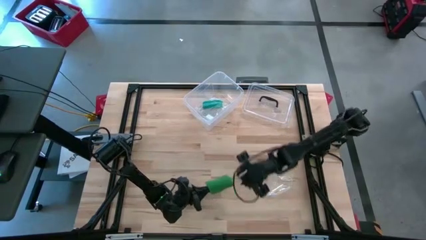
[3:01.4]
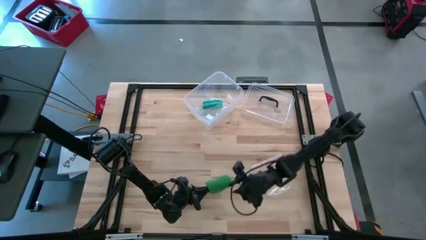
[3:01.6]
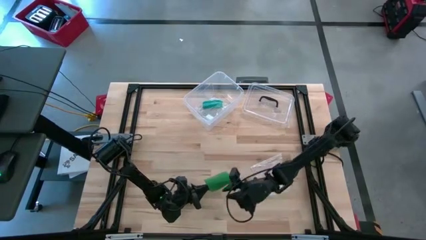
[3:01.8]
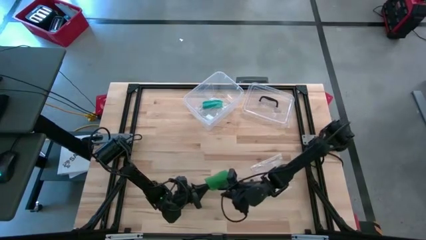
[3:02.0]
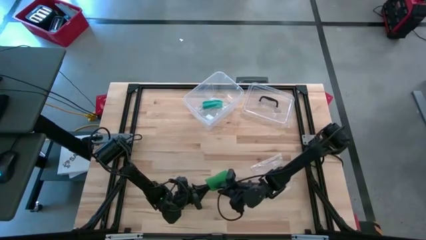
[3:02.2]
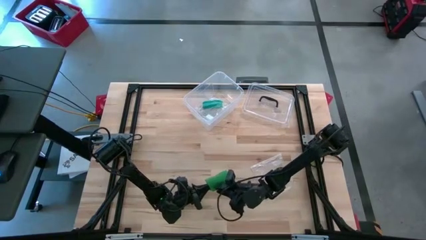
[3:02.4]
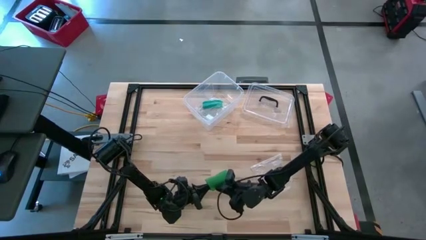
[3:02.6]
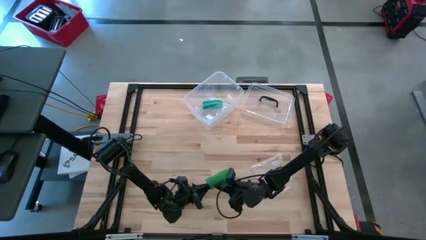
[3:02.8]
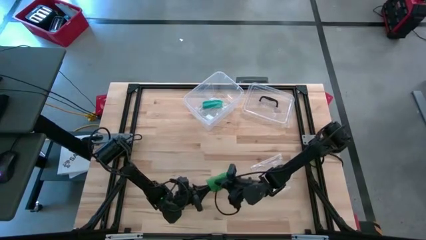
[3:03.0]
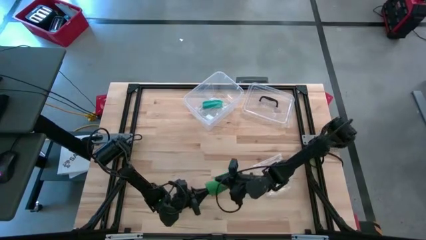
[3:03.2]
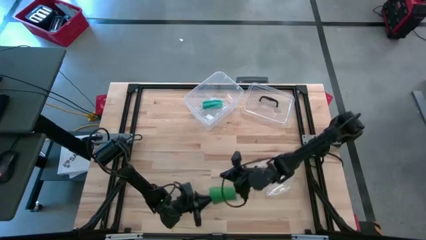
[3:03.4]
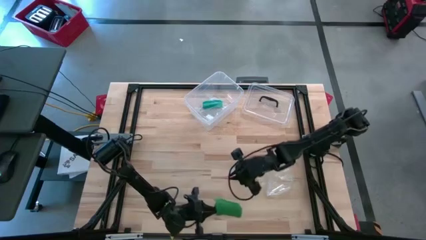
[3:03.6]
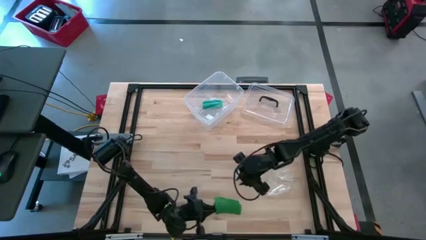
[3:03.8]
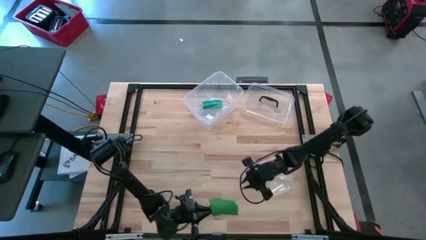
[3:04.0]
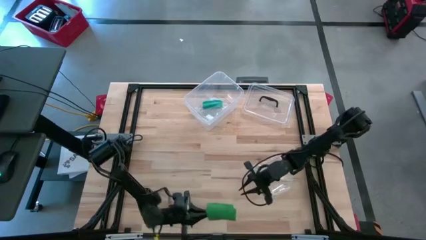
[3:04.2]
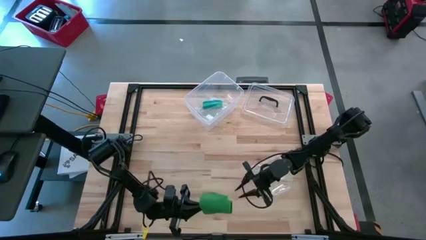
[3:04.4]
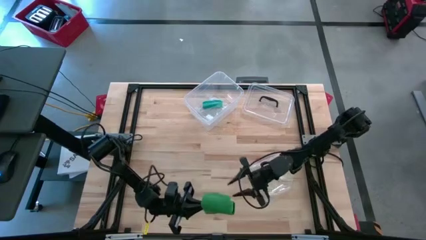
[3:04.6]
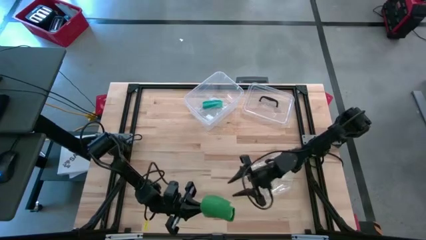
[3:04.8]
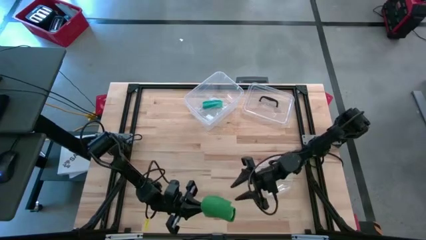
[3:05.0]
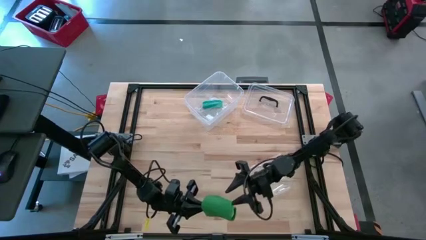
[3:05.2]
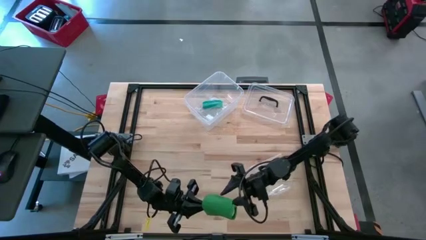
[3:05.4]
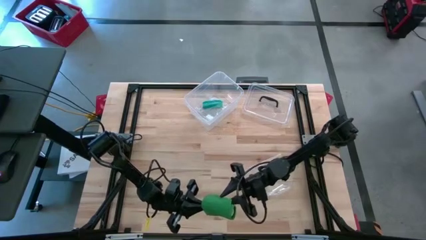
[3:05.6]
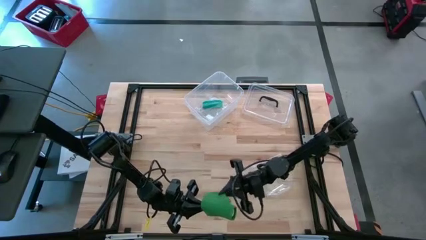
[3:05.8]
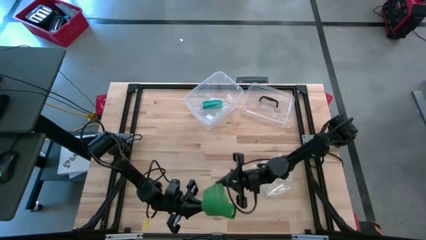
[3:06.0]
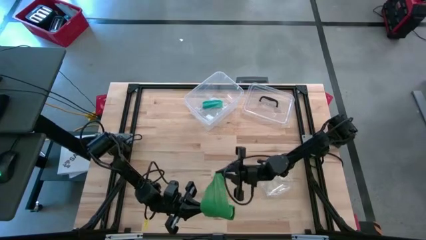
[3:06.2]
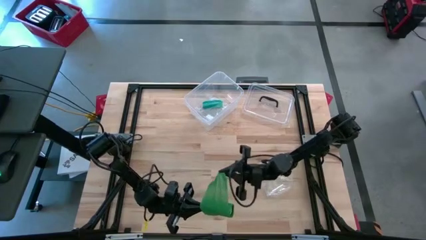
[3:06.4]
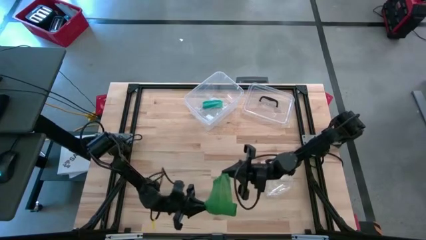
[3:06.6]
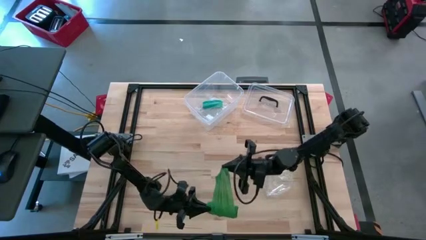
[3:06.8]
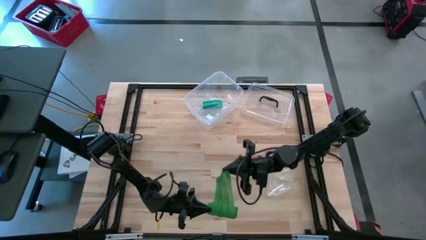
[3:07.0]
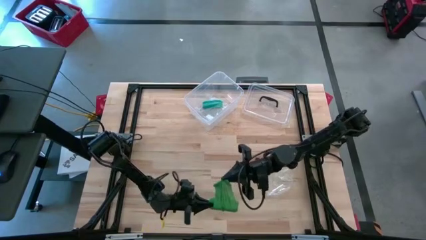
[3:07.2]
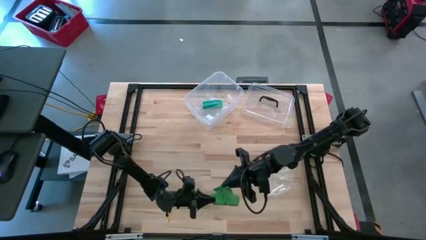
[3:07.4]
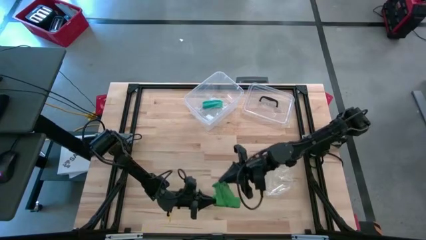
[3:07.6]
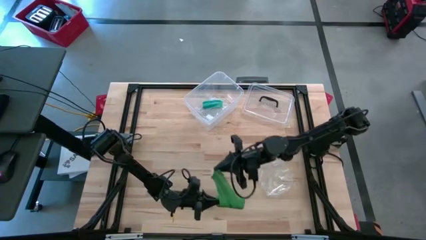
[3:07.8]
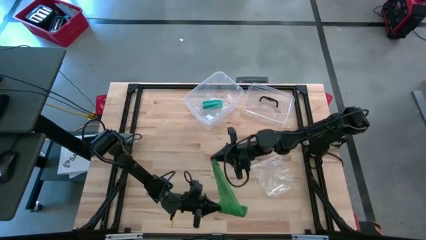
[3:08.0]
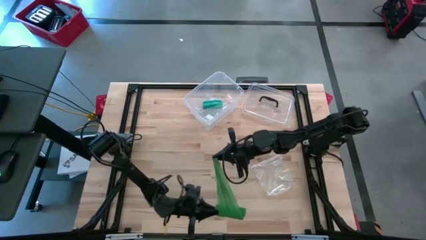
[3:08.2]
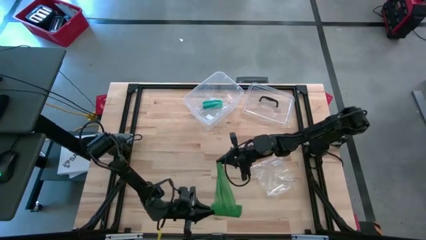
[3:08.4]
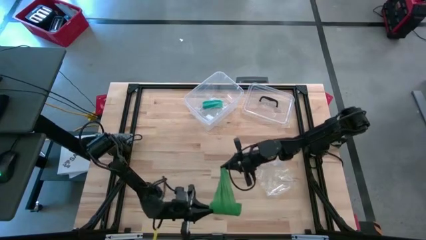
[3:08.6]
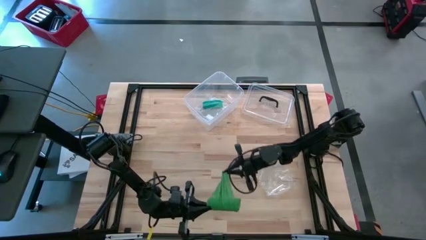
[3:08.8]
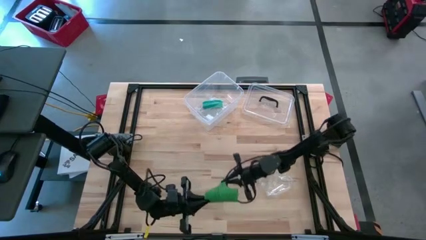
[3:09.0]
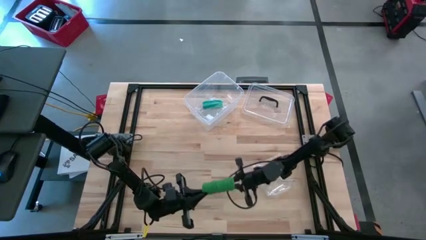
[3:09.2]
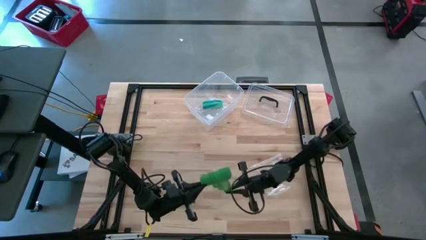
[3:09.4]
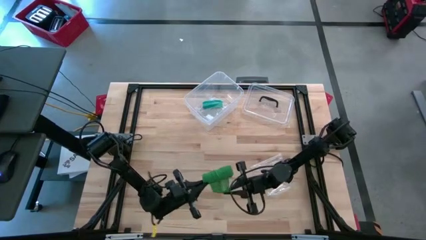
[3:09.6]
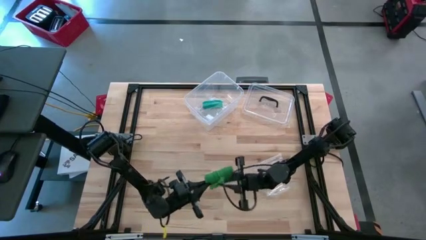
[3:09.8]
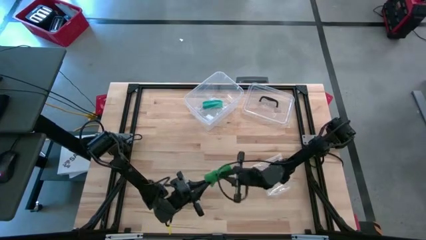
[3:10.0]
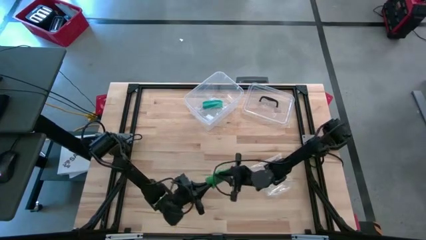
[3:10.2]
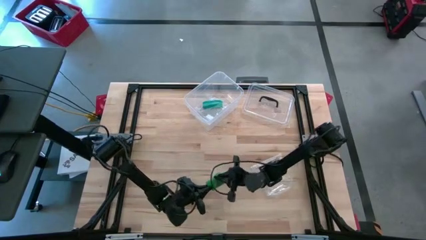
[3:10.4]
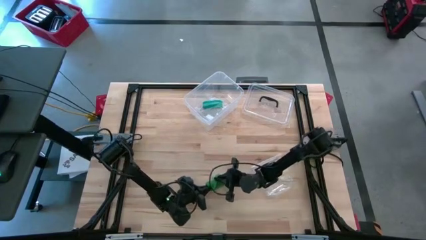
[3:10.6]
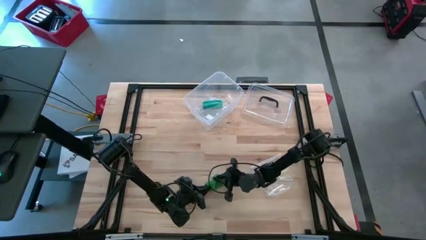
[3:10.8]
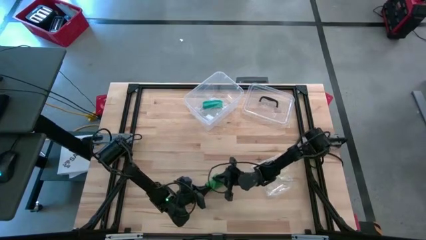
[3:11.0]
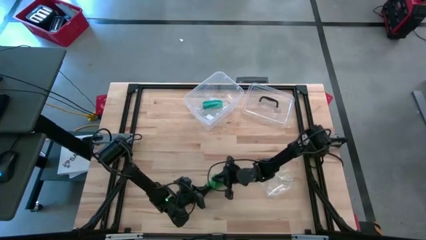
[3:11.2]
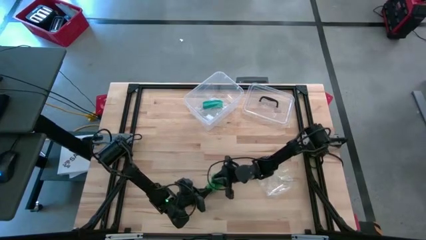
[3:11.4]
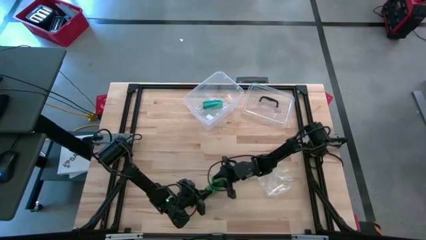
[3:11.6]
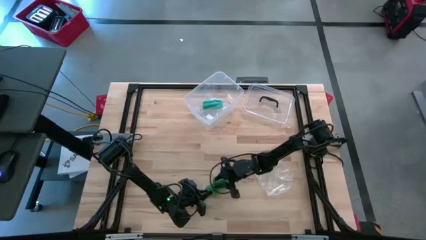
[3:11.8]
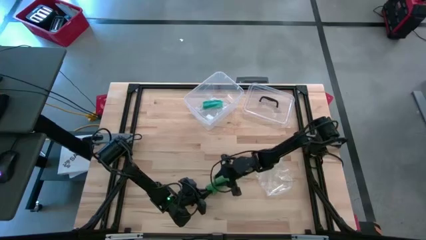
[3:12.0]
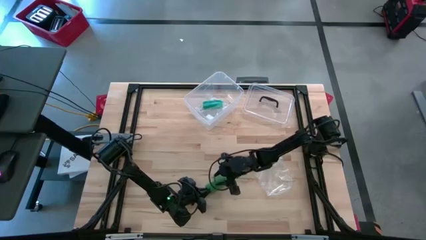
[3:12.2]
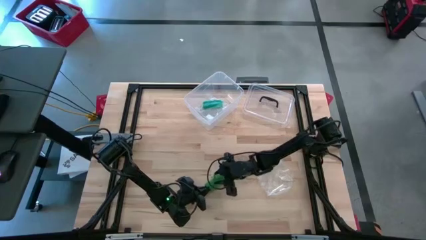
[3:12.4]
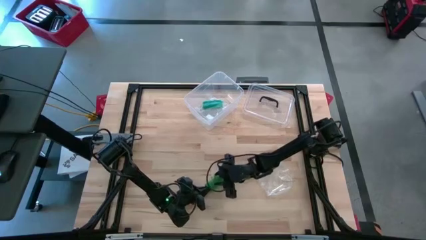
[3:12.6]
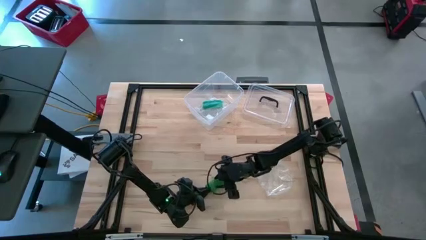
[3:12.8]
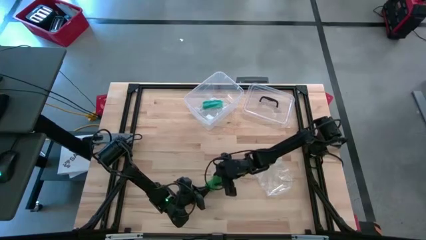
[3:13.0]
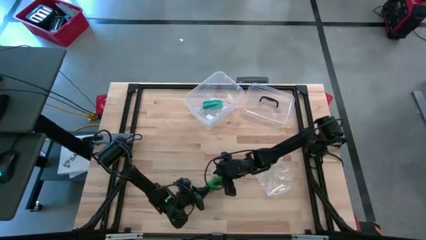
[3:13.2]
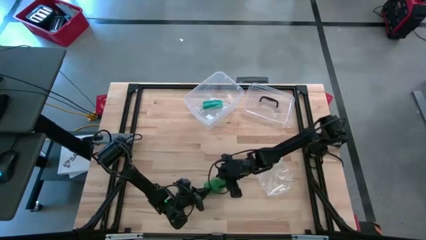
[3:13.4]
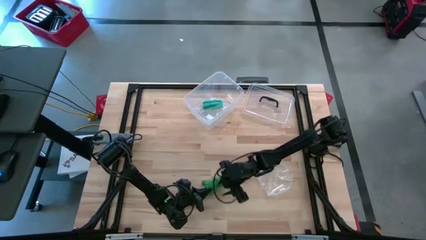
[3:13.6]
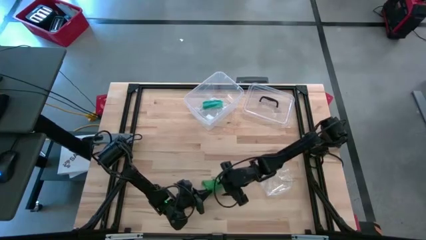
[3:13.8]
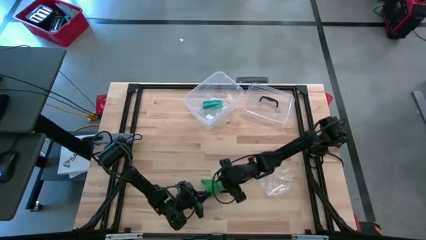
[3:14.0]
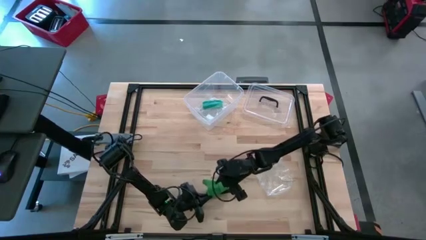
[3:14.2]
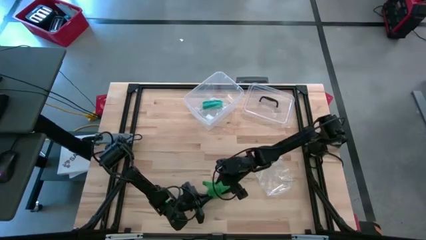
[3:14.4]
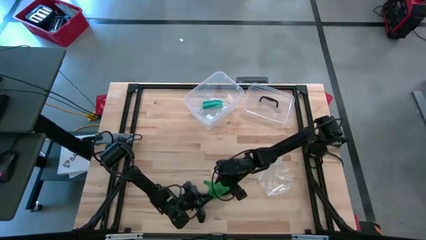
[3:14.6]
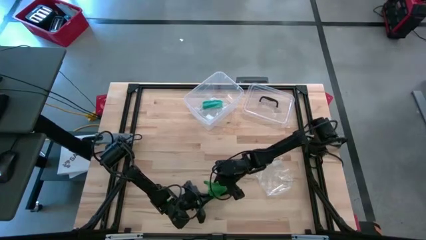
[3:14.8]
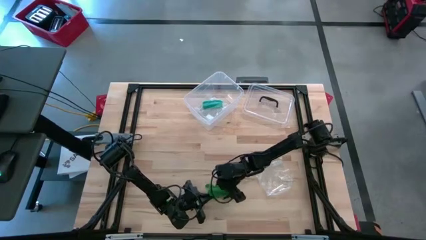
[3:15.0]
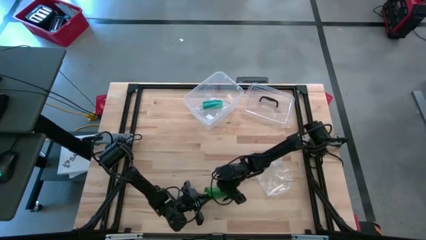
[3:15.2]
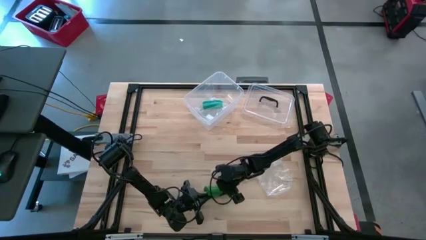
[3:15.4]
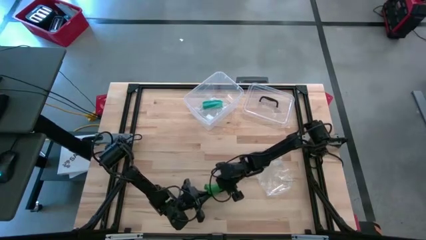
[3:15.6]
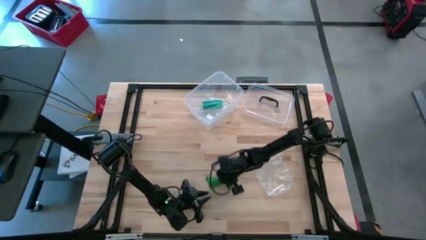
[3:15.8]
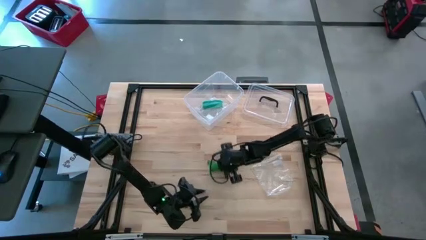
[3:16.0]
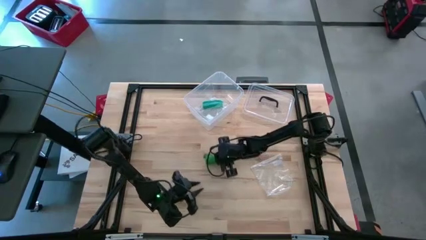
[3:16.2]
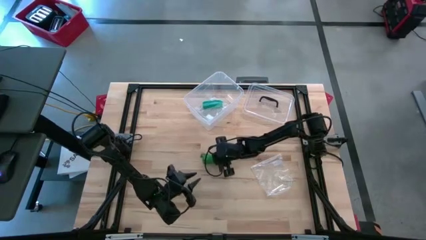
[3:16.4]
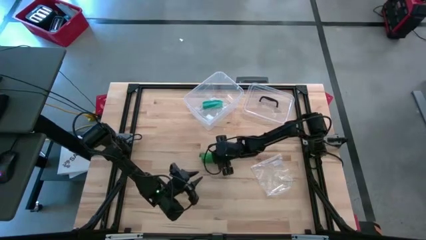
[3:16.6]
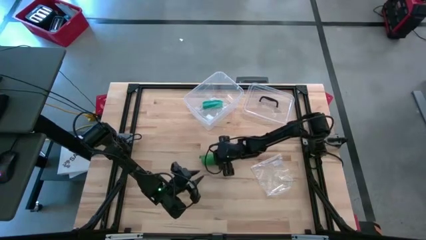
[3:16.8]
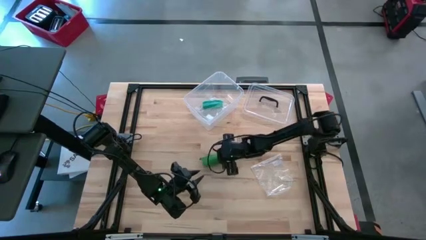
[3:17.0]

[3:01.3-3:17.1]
Task: Roll bandage
Roll the green bandage
